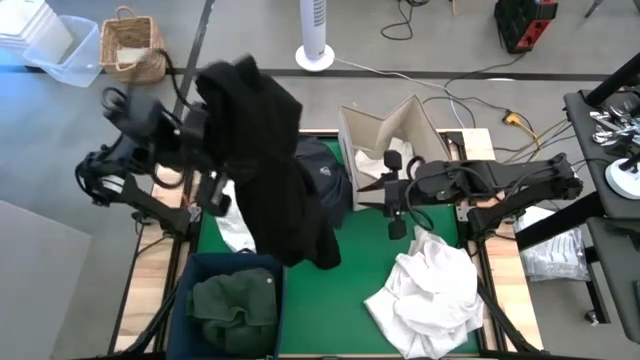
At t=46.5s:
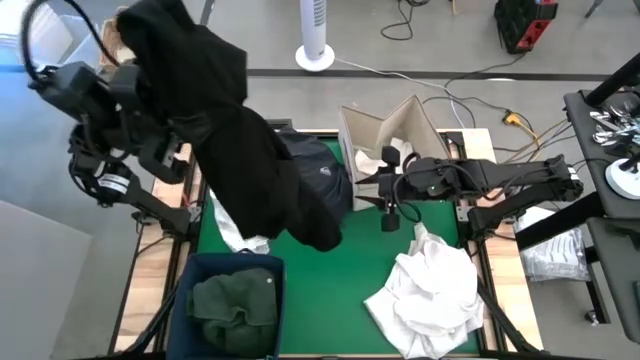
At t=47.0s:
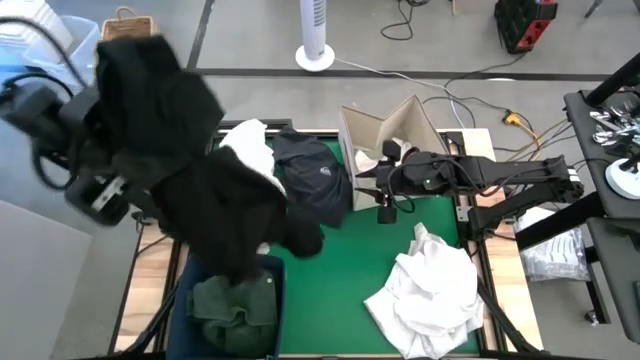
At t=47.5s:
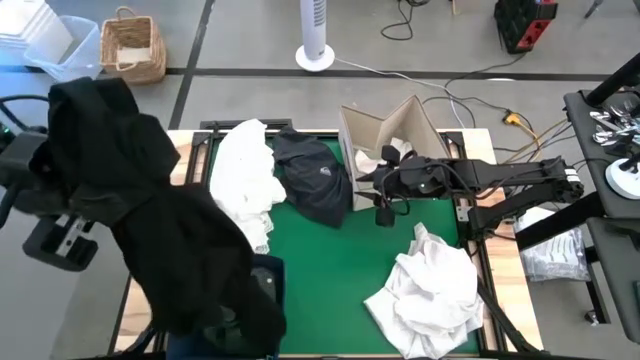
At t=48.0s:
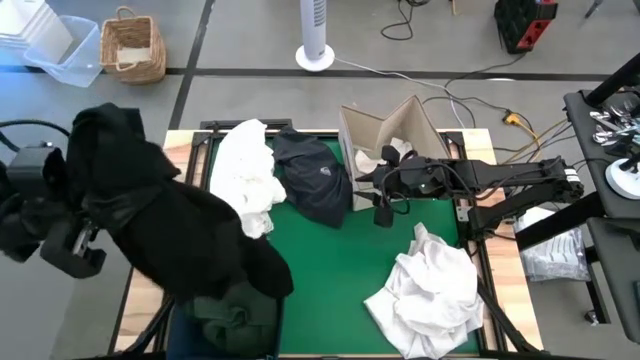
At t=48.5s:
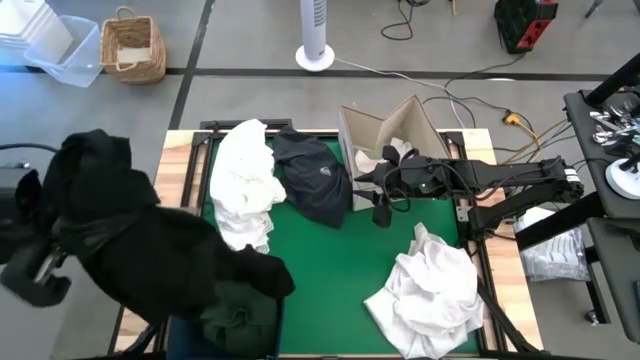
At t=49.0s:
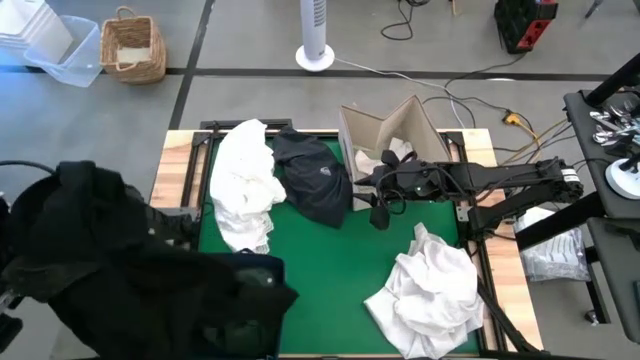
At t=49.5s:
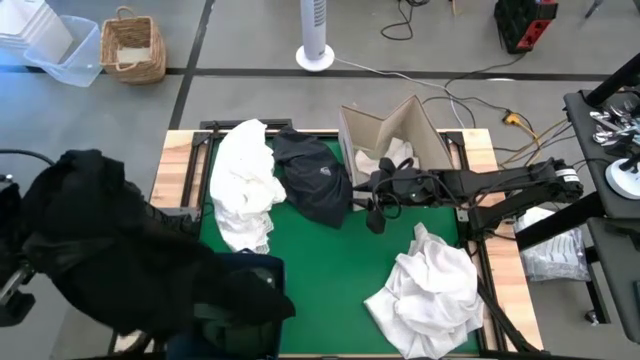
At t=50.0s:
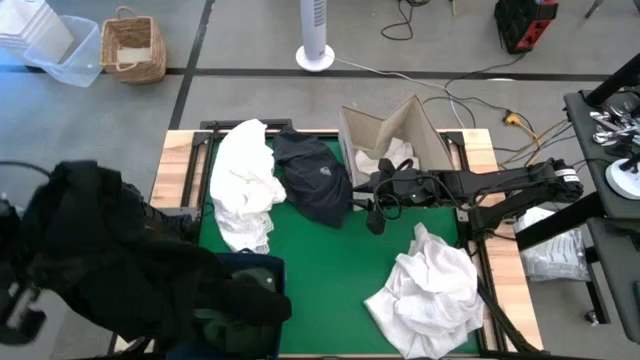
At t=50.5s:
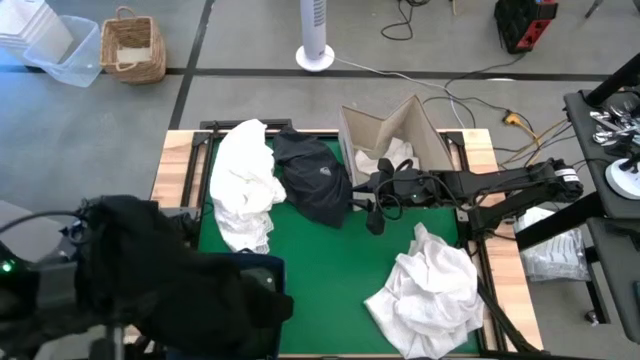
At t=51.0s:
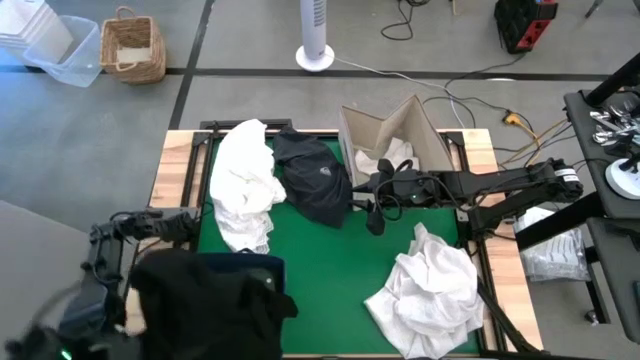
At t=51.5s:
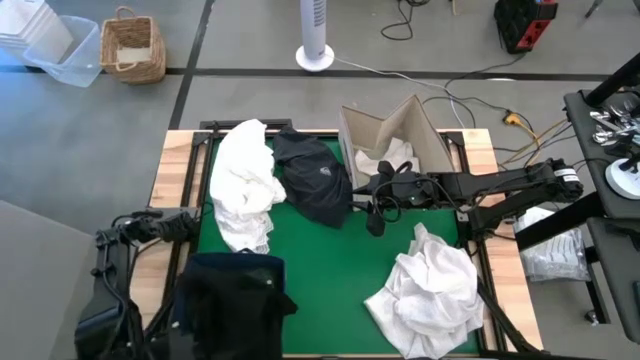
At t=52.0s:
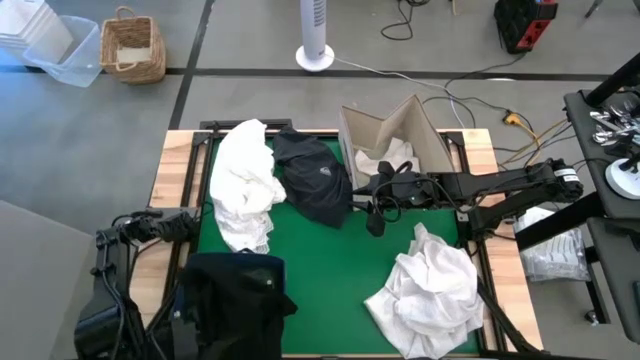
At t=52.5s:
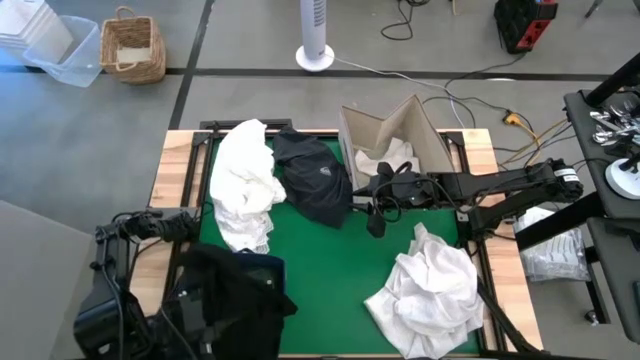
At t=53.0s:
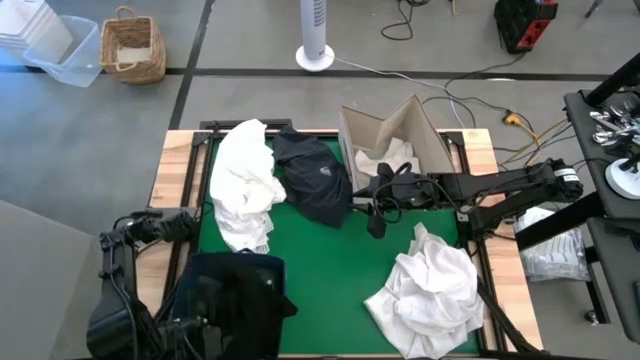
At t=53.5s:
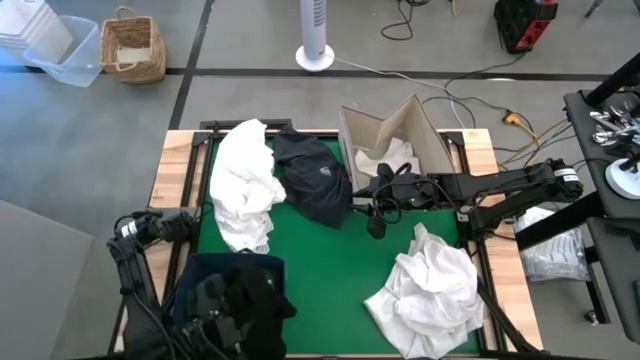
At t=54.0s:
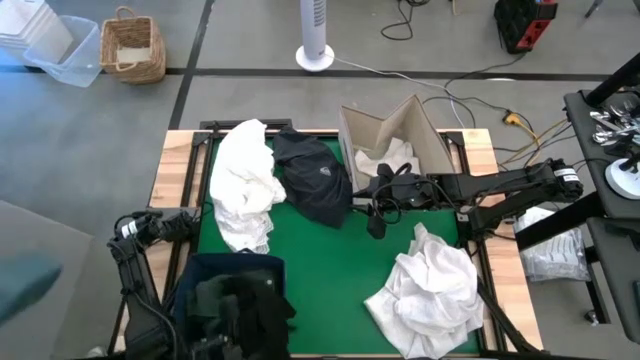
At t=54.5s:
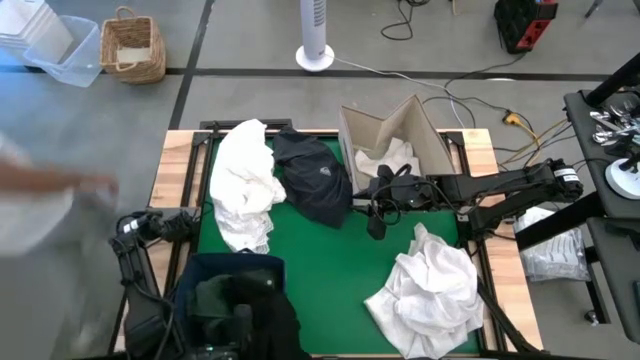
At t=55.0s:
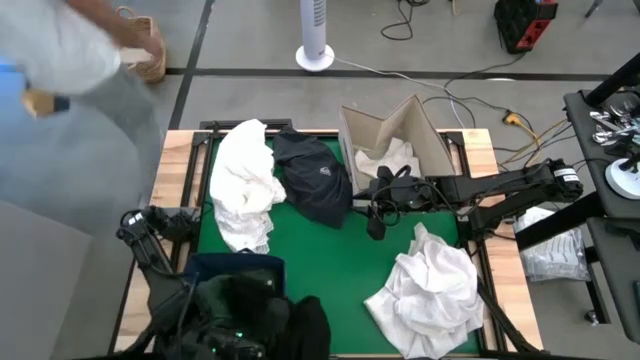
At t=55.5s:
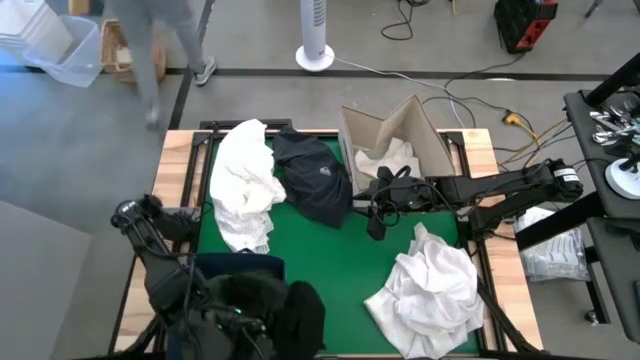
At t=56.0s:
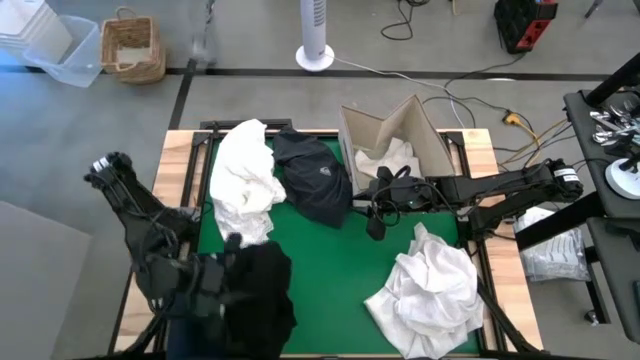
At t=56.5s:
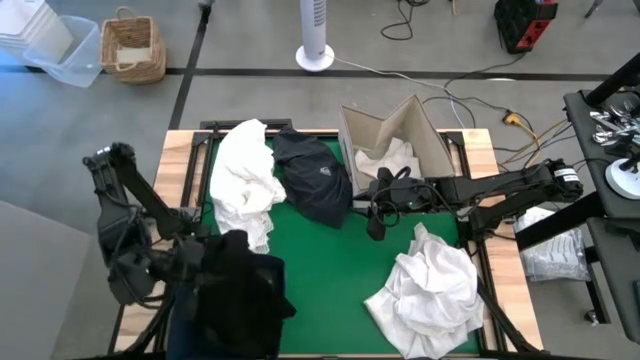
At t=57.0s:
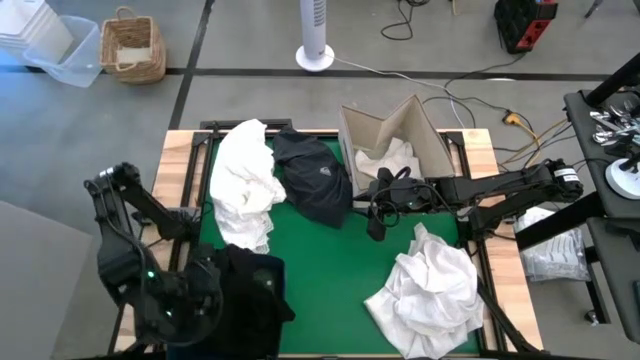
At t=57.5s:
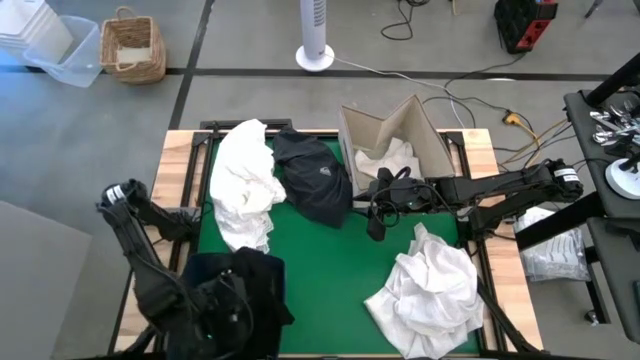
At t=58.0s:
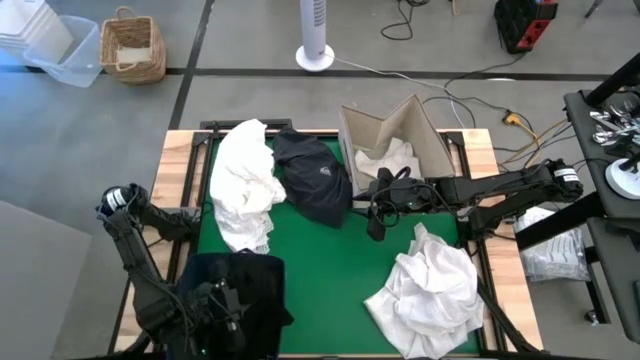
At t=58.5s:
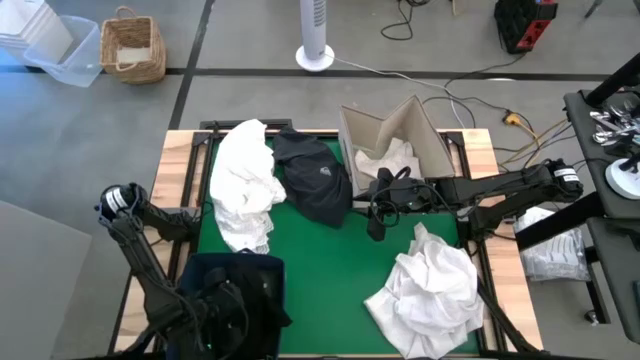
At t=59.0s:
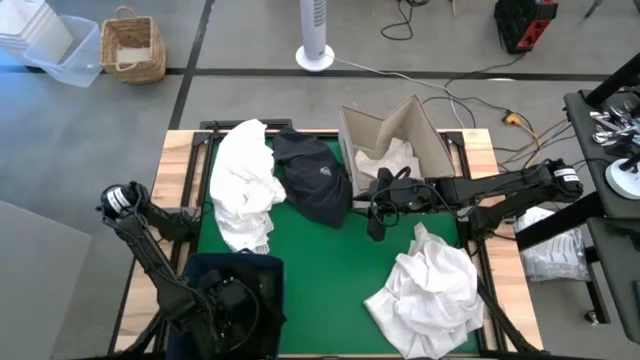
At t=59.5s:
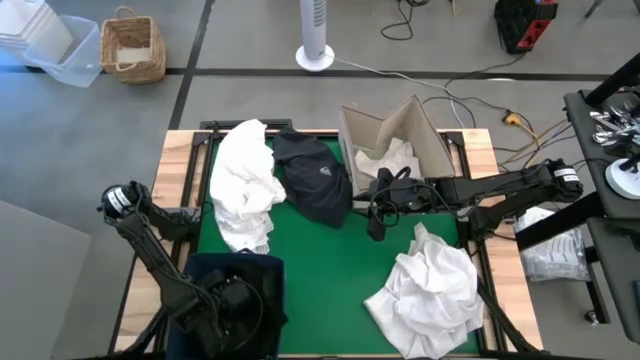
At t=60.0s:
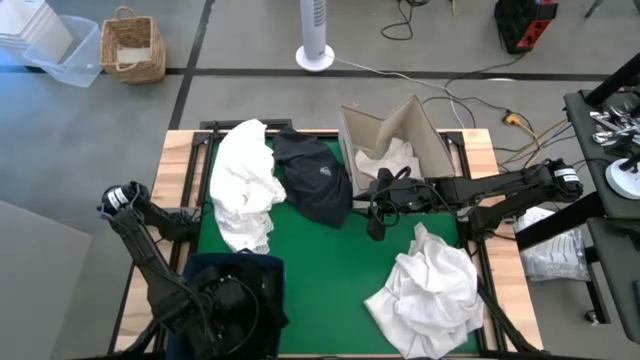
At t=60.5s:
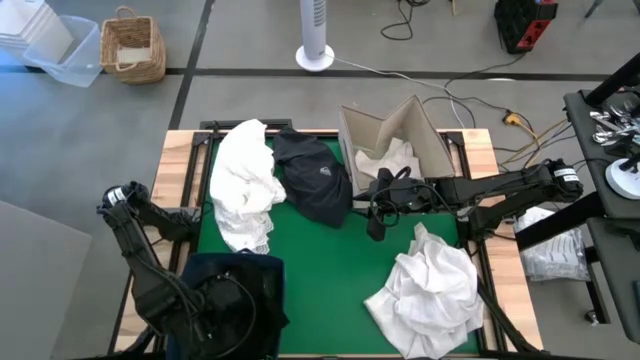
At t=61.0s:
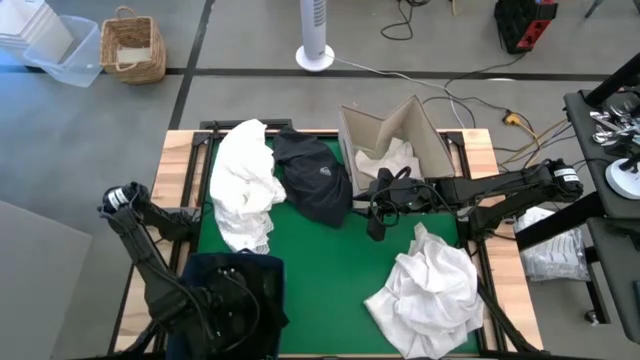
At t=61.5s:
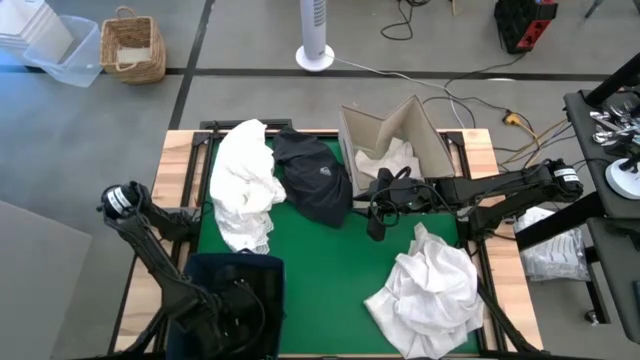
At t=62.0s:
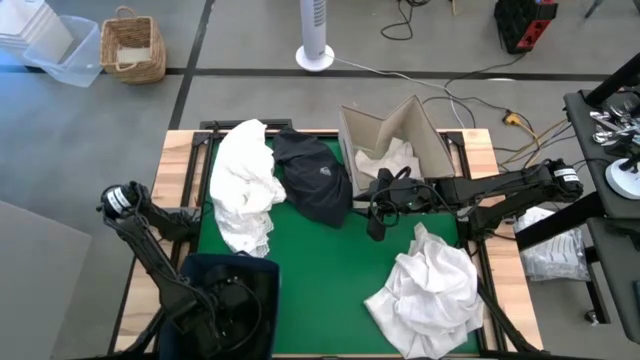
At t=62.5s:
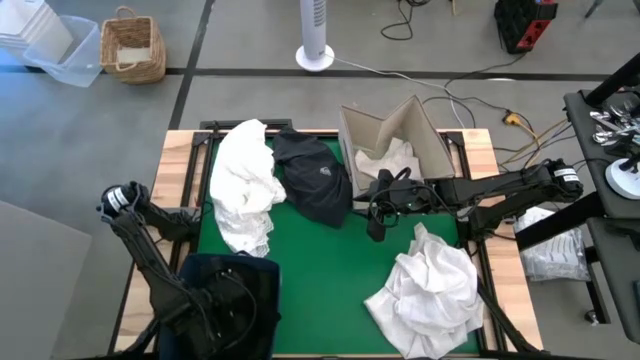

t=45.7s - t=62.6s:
Put the black jacket into the blue laundry organizer
